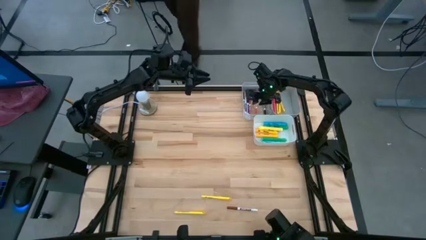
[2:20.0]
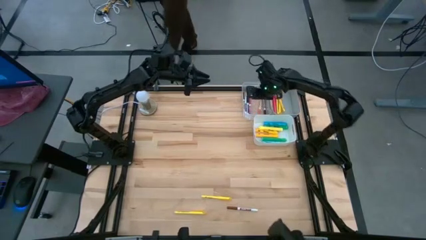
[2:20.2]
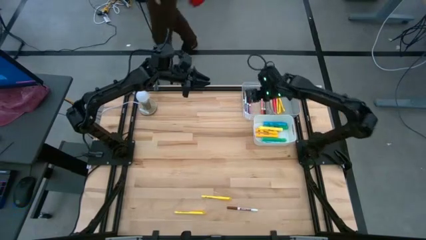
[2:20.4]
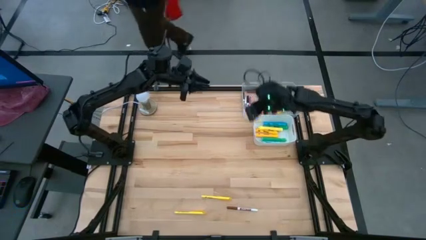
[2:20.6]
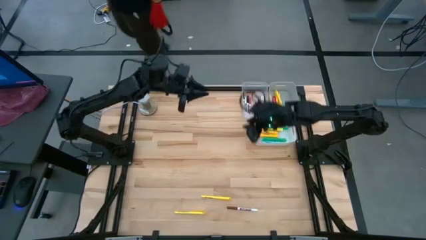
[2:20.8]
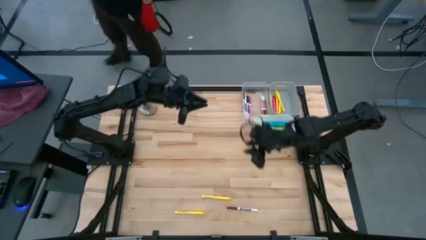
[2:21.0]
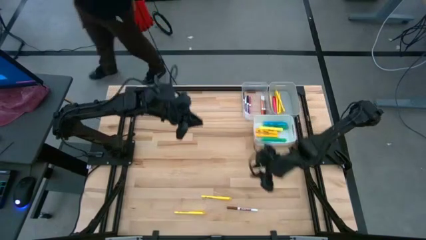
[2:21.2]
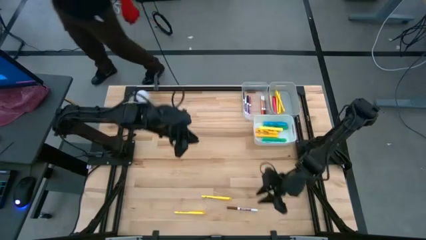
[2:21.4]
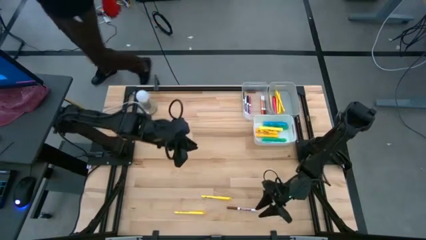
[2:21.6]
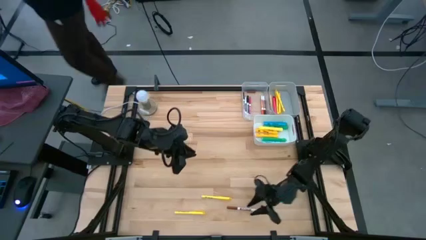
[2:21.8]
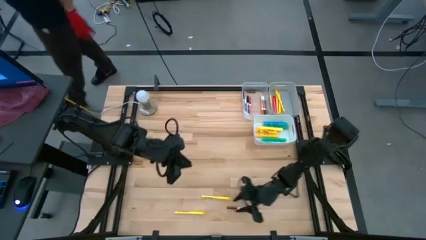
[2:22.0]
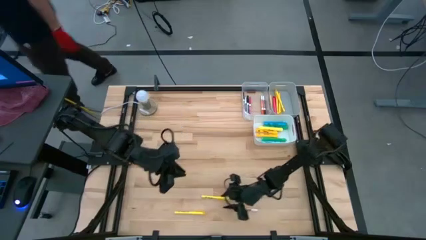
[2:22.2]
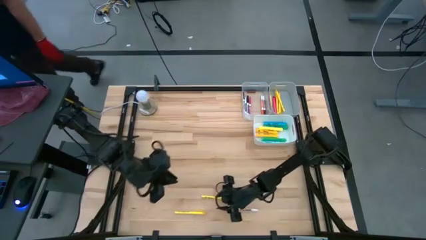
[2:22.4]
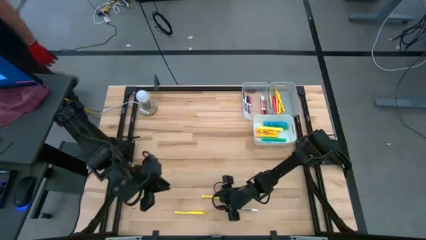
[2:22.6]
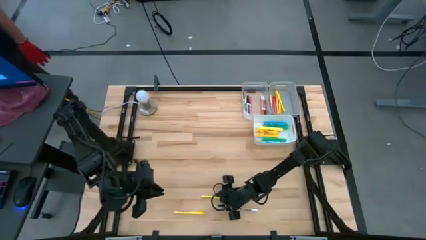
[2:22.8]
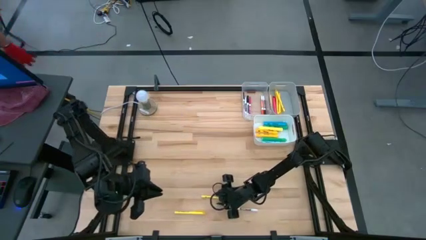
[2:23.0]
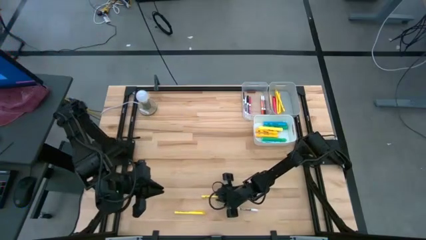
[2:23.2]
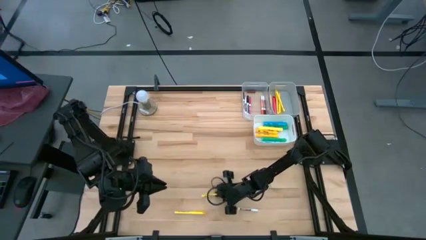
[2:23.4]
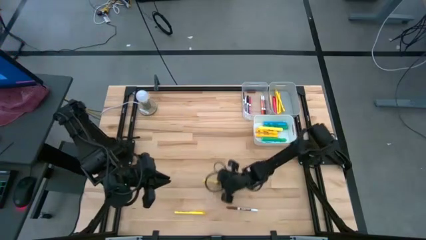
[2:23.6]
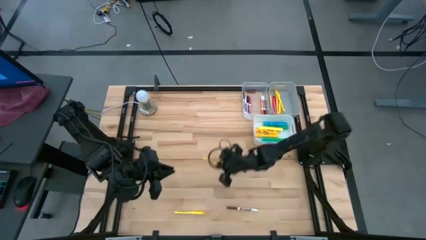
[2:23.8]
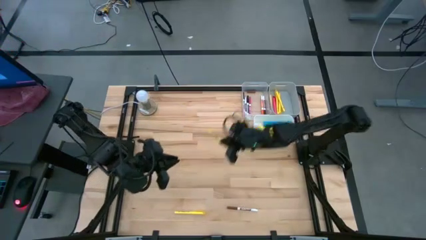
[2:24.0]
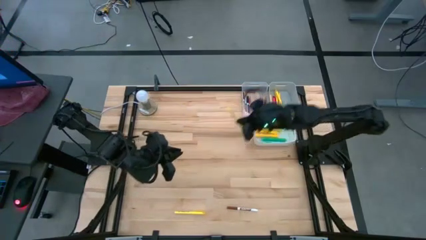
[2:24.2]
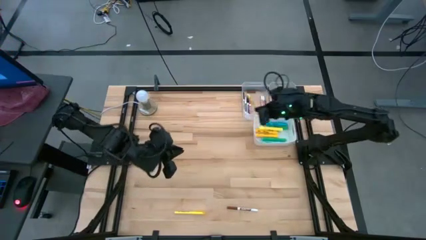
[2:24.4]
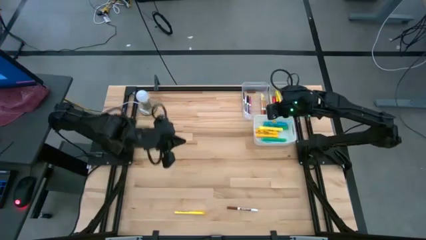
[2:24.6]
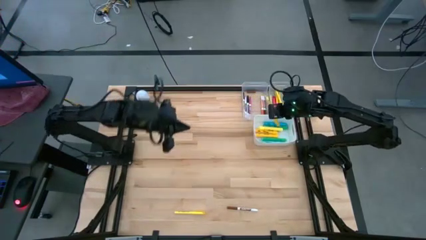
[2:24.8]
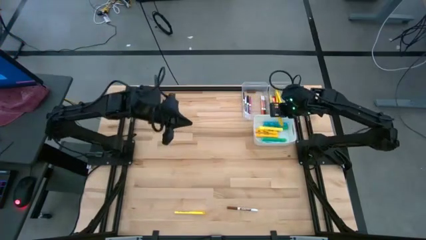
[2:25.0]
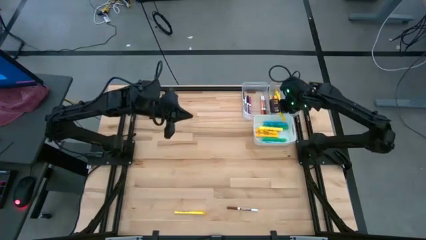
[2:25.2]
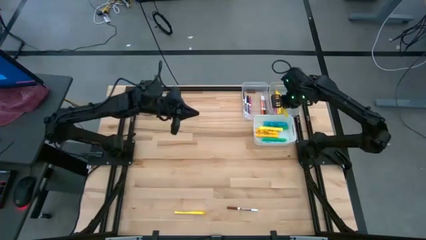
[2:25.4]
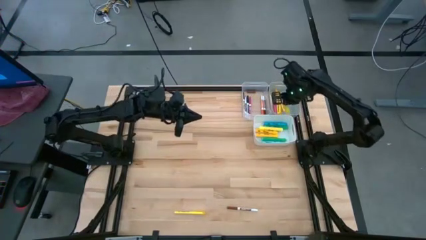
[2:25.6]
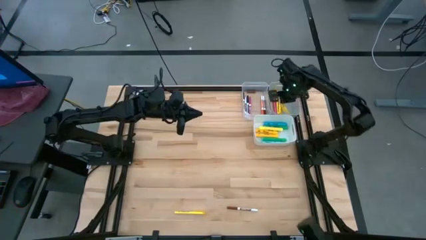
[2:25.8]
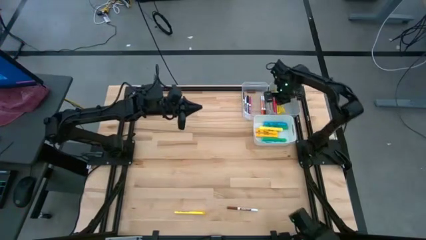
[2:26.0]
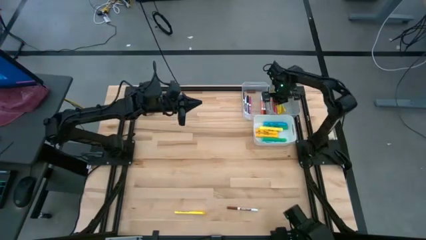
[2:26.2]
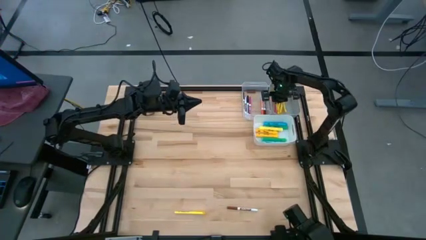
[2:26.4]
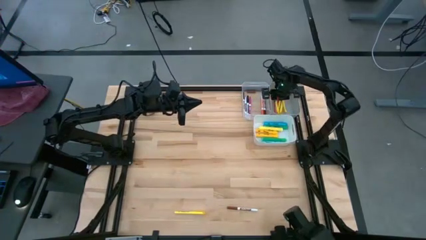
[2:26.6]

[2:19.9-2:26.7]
Task: Pick & Place Markers
Put the yellow pen into the gray bin

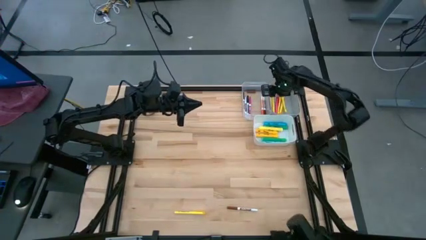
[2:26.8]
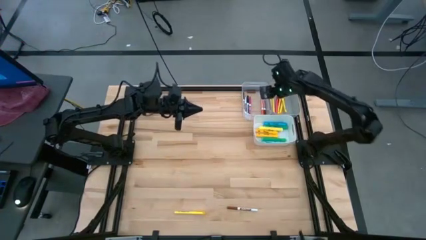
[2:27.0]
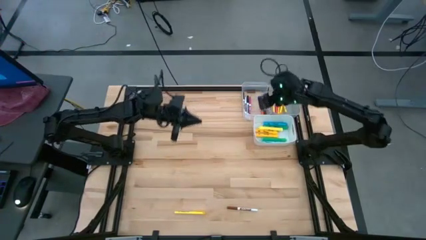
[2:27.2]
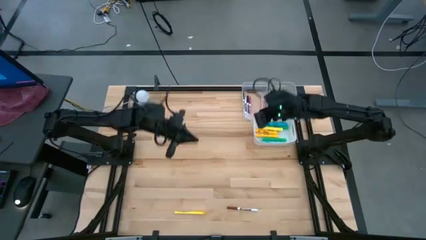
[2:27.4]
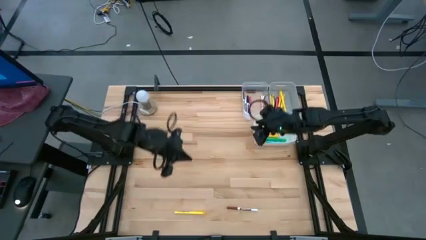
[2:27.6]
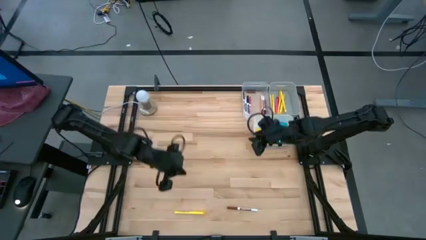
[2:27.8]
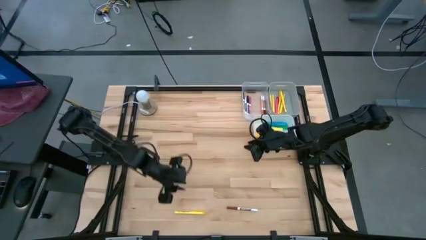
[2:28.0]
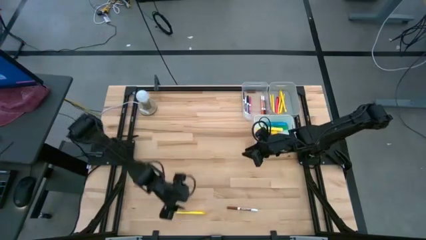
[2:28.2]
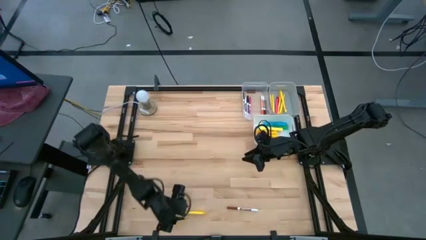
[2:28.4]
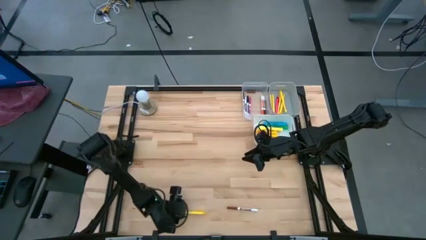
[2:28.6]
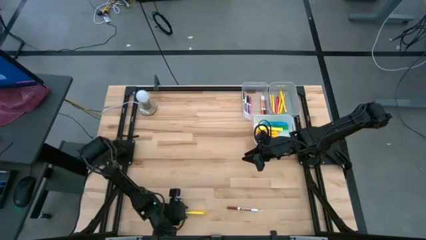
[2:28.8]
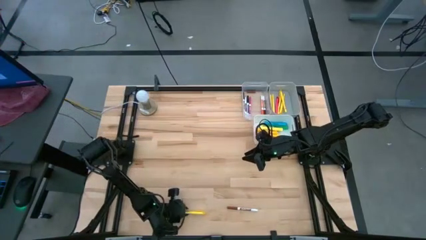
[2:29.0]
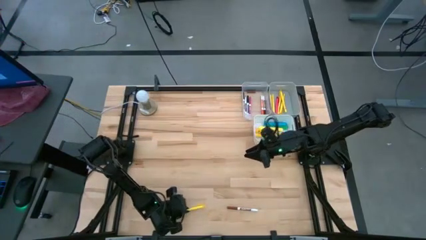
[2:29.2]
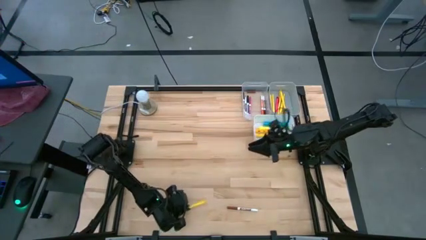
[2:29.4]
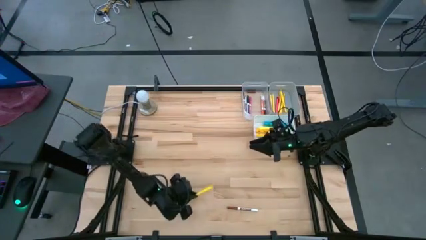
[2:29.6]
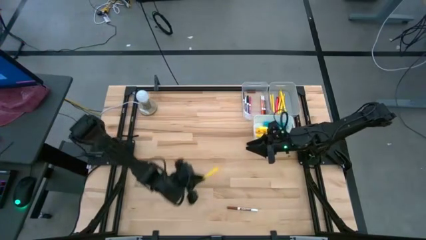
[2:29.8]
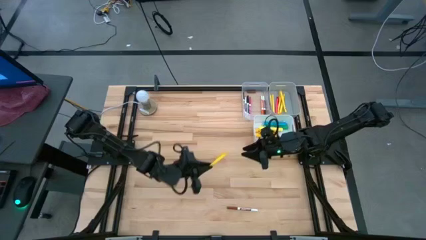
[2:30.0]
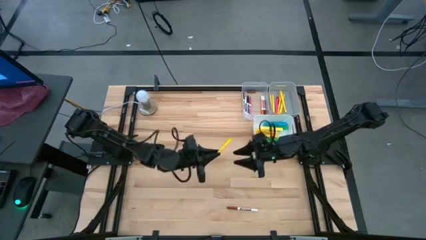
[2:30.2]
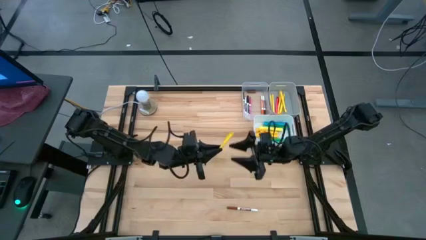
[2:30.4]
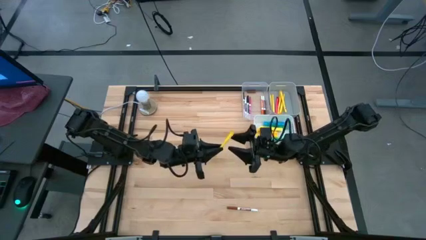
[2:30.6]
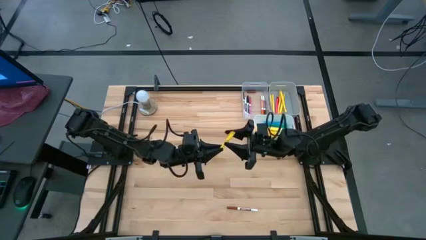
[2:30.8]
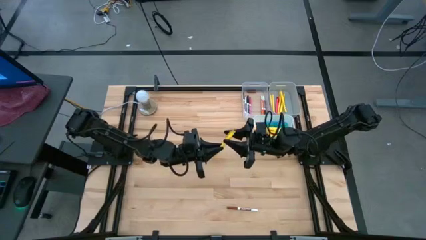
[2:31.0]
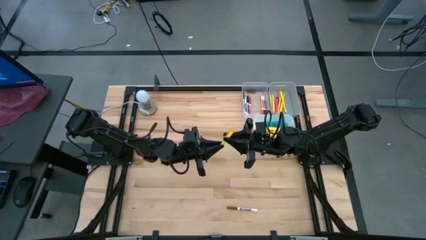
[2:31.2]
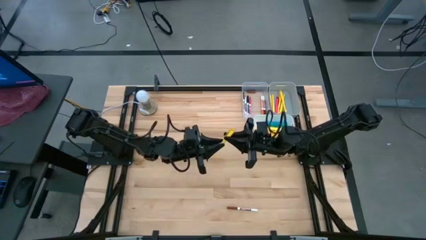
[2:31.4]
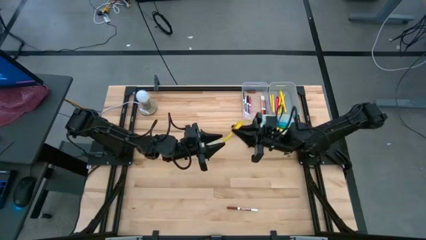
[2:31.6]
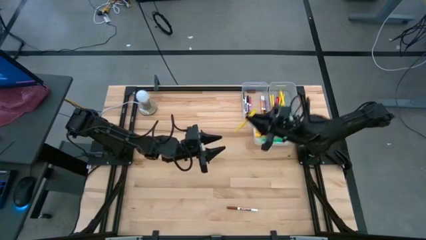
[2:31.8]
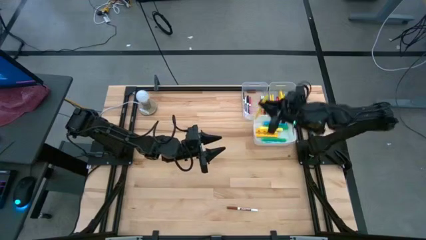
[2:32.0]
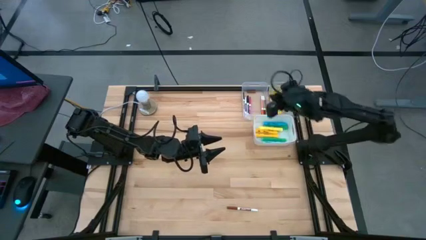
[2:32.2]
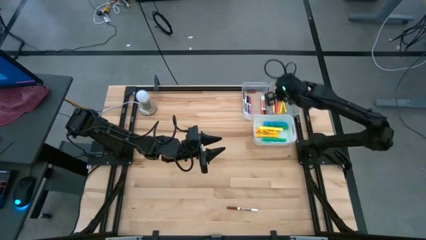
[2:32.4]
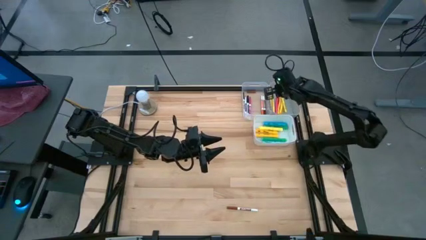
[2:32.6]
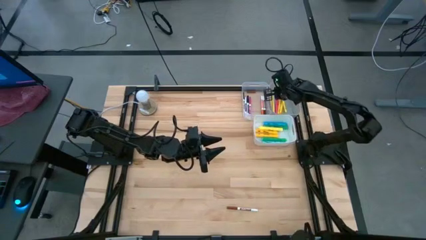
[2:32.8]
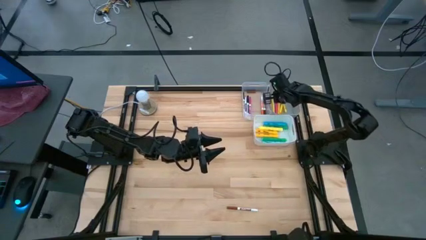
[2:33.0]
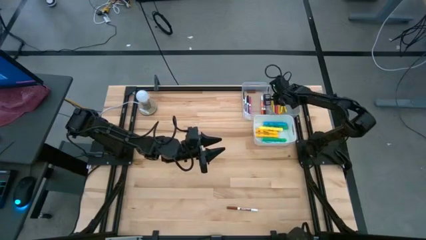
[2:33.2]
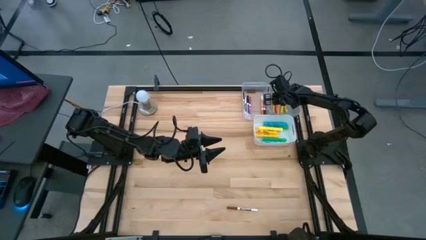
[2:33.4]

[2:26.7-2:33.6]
Put the yellow pen into the gray bin

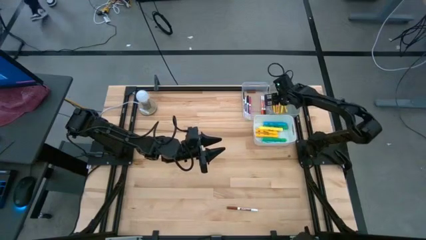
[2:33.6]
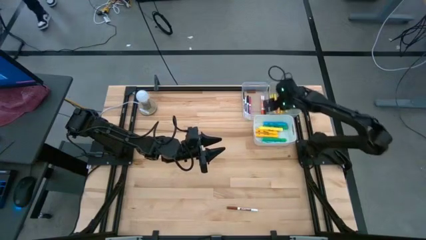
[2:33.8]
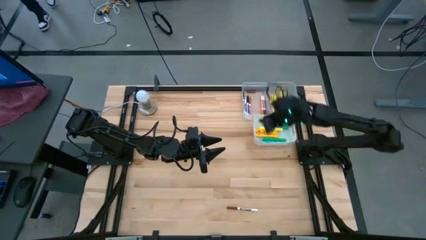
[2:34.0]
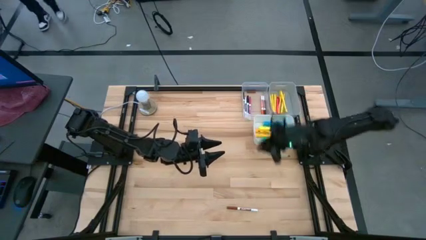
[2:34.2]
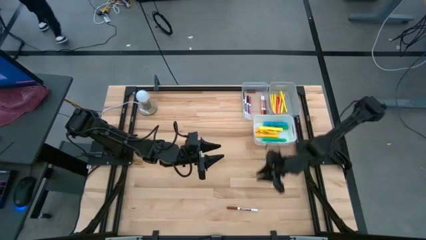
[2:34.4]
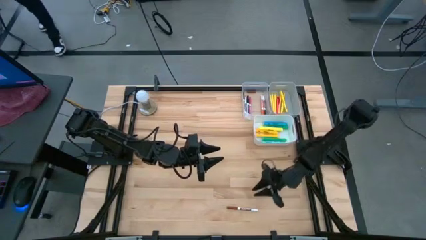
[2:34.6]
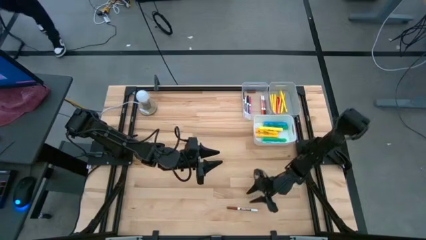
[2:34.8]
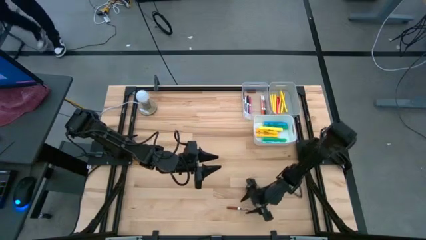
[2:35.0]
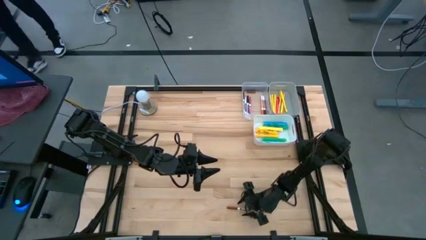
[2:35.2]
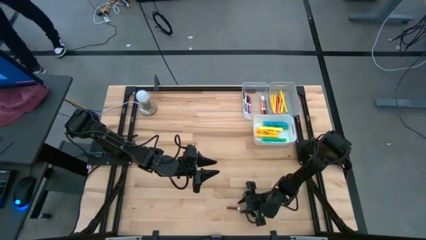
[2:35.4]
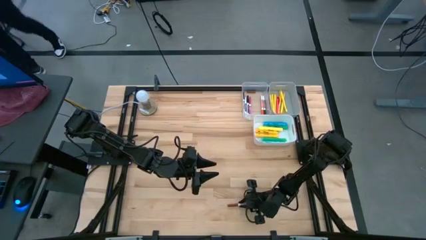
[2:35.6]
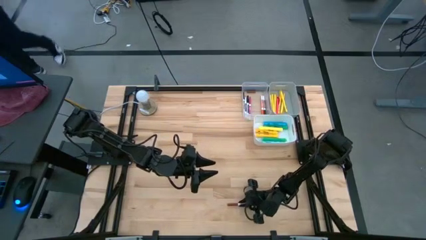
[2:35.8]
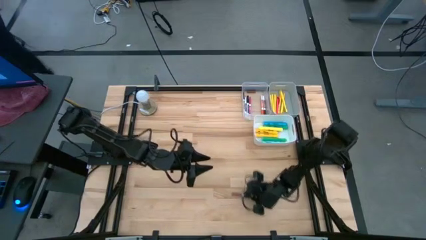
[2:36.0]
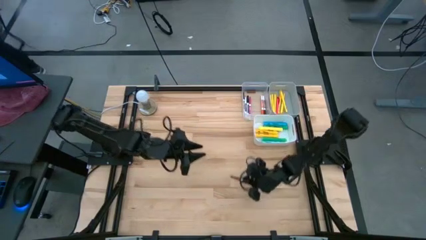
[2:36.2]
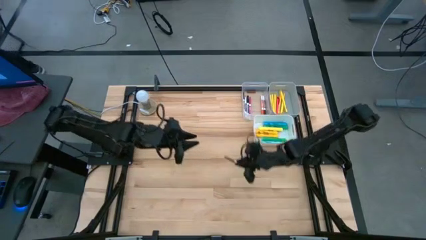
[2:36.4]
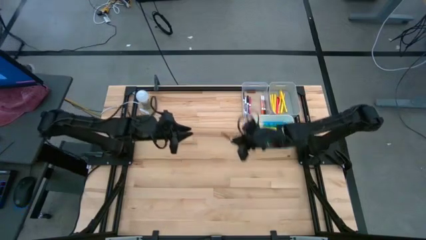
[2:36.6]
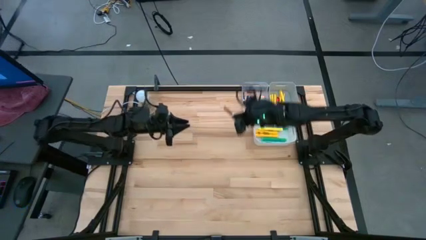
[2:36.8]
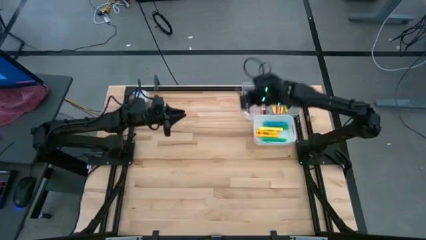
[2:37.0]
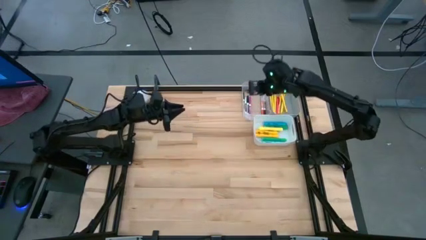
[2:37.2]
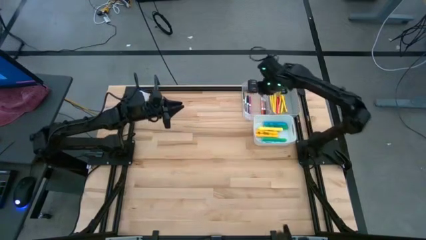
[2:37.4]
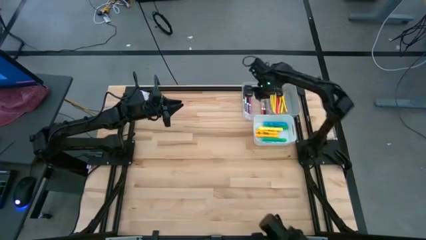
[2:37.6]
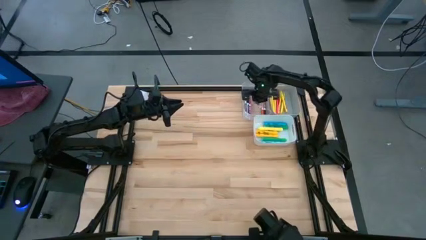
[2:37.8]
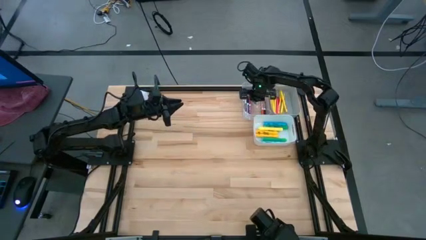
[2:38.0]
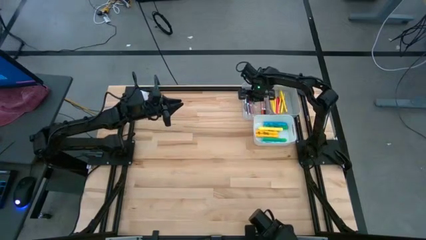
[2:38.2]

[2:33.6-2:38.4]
Put the brown marker pen into the transparent bin
